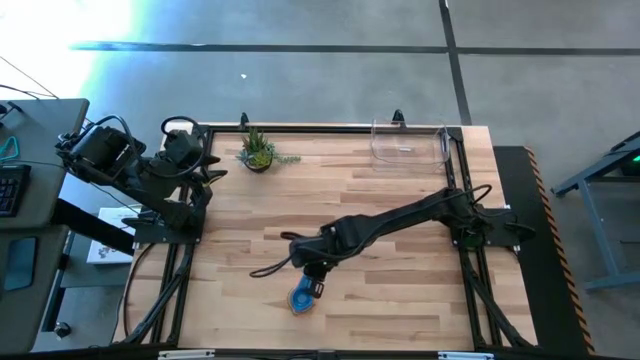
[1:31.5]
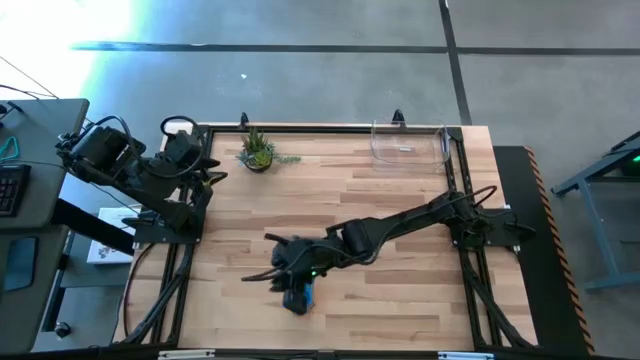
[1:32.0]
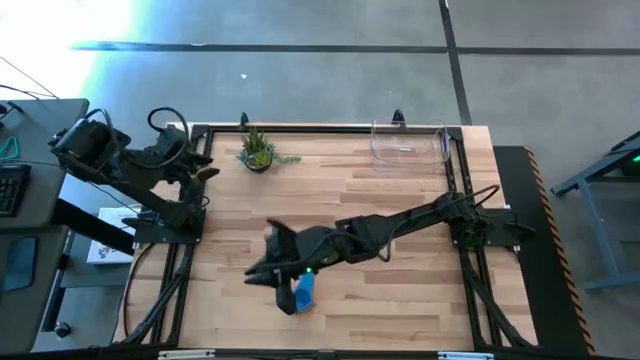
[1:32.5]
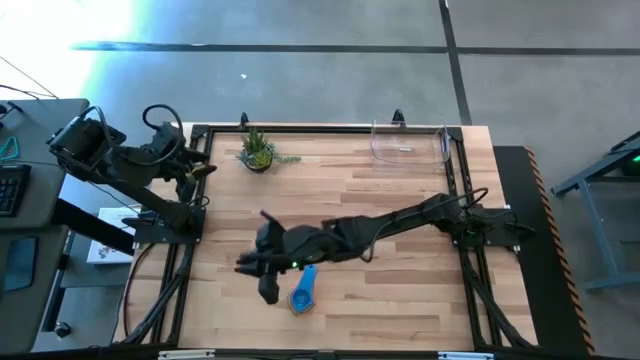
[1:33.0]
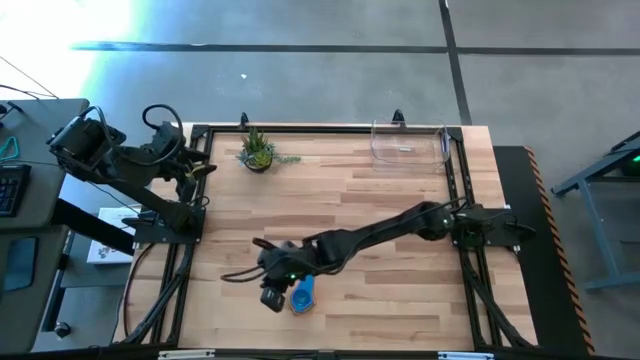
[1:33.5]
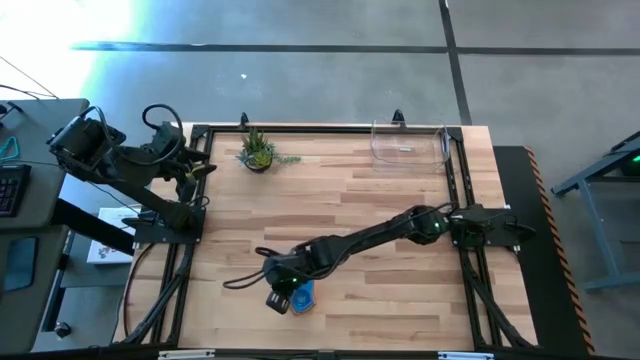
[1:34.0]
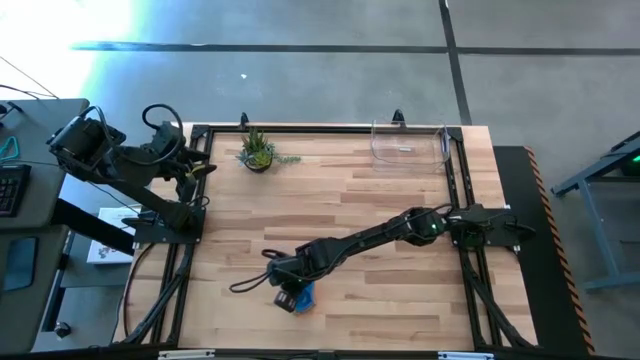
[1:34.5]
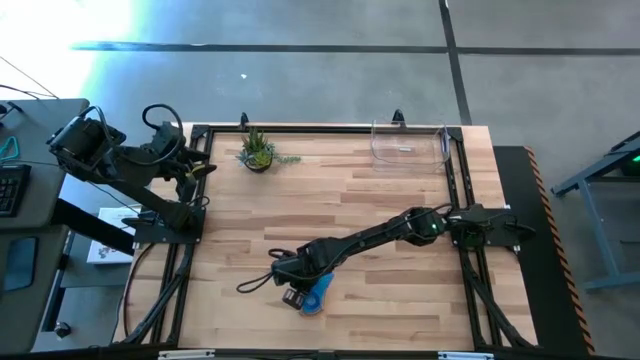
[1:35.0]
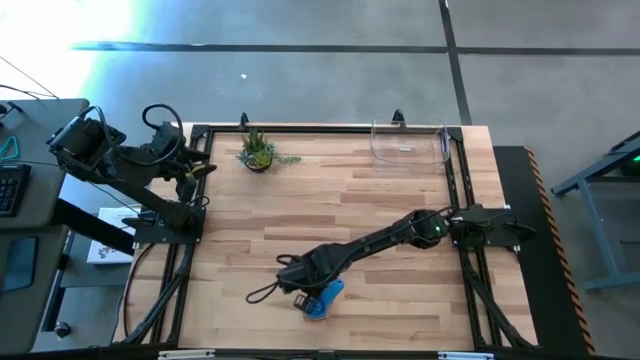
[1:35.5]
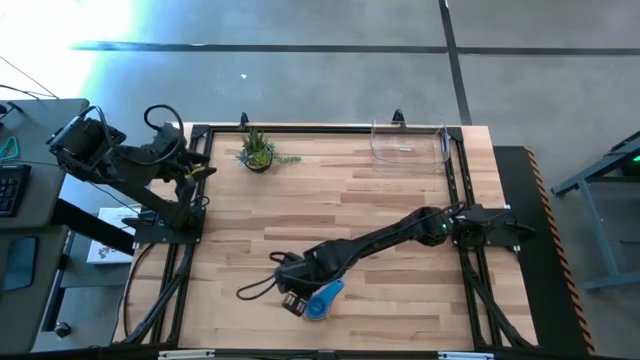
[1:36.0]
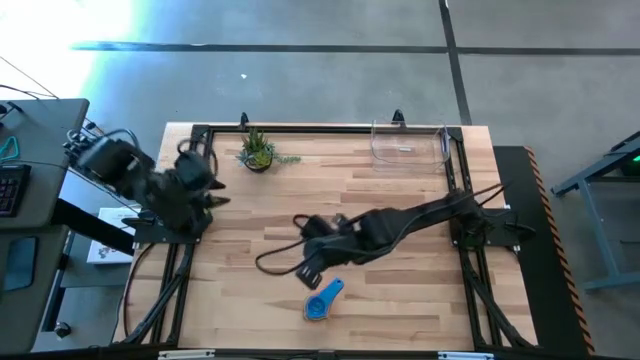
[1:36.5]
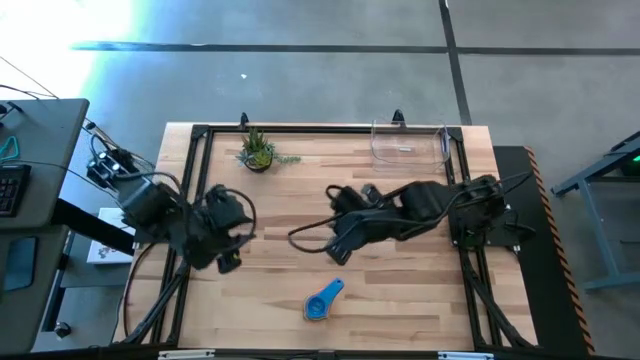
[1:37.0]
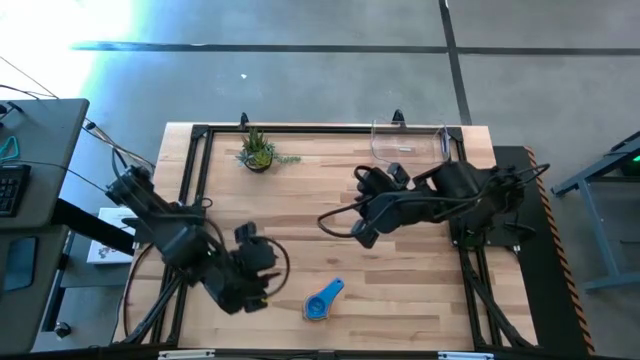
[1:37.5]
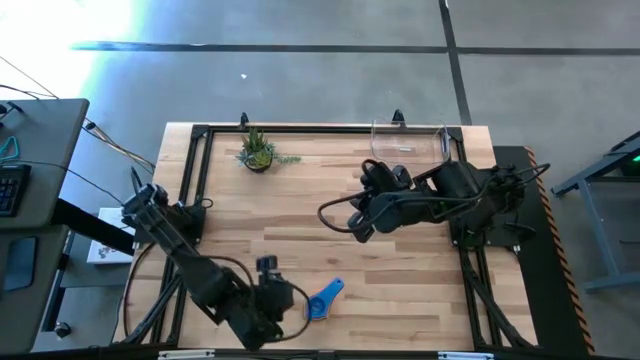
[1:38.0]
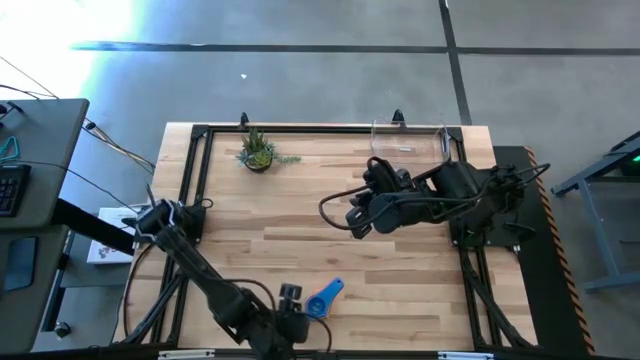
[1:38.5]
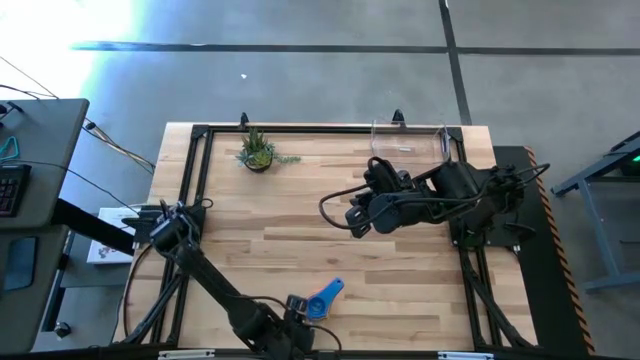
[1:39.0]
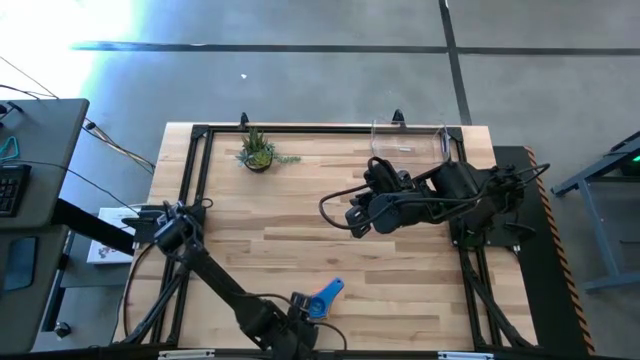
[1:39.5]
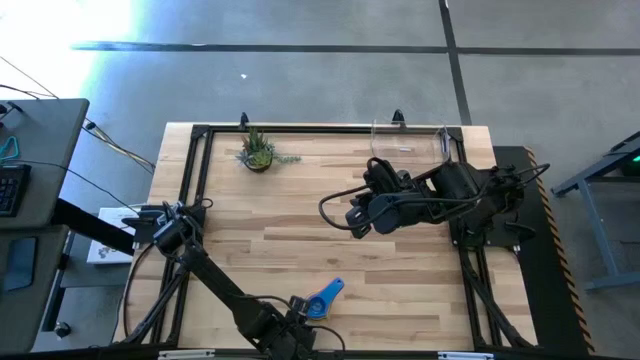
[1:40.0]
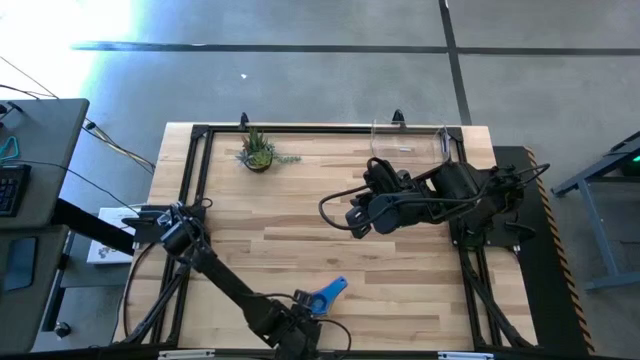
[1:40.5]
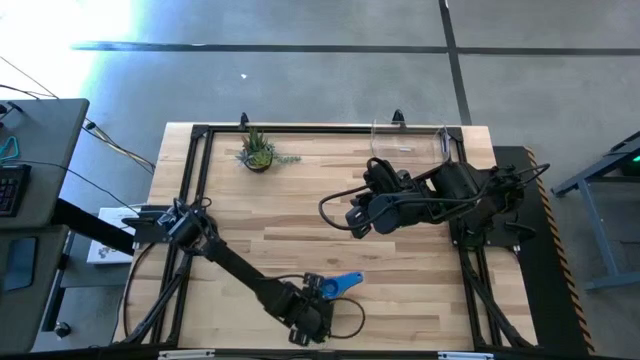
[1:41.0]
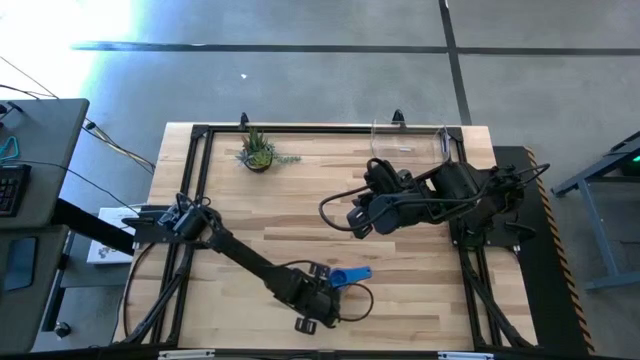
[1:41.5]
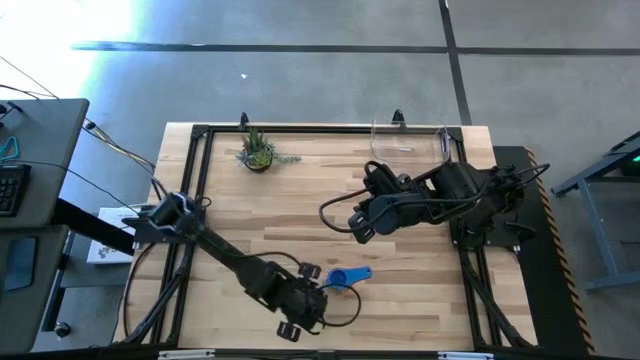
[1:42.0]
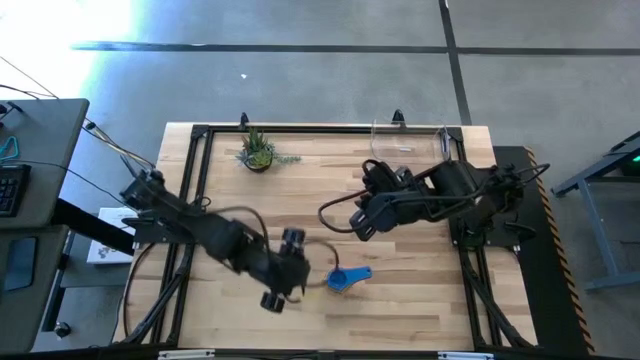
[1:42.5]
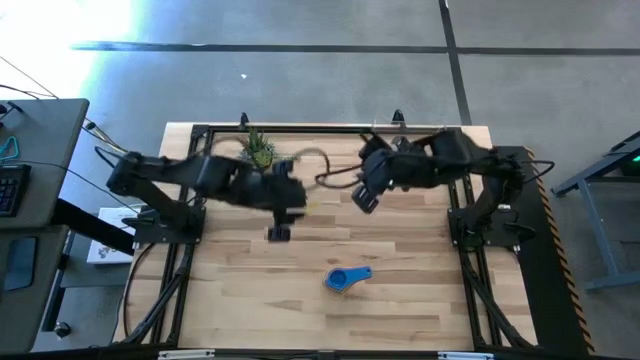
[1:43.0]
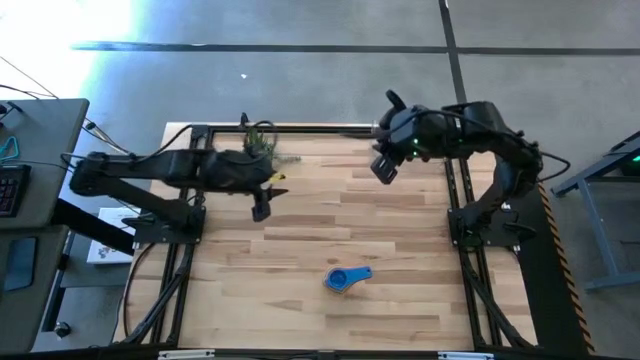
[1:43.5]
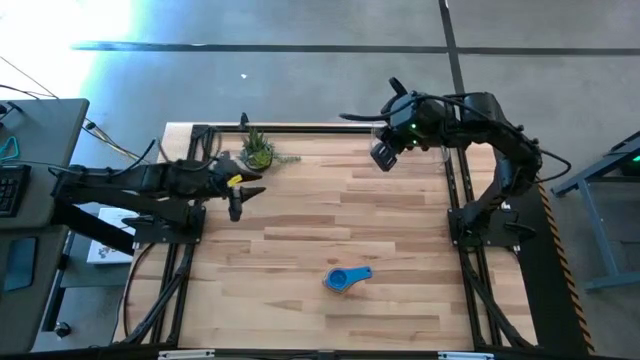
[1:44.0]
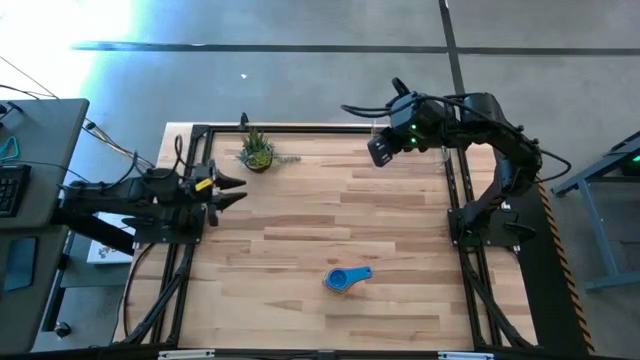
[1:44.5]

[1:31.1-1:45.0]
Task: Nest measuring cups in basket
Put the stacked measuring cups into the transparent bin

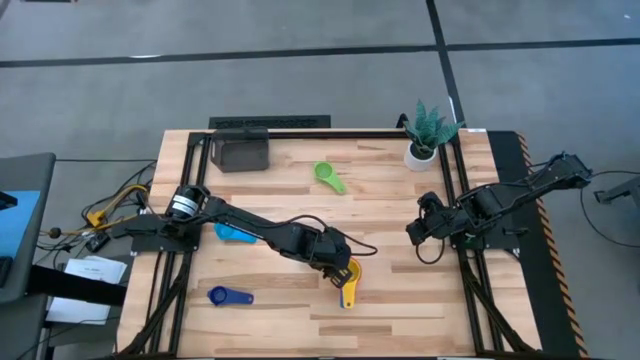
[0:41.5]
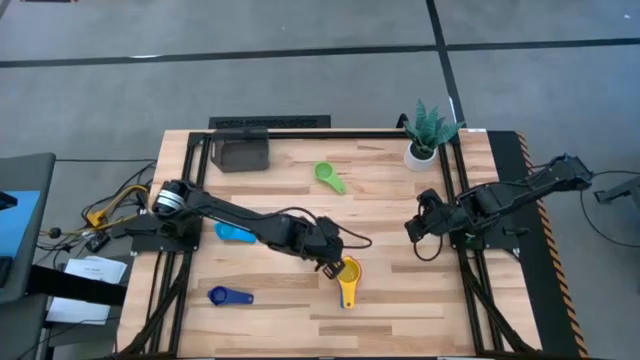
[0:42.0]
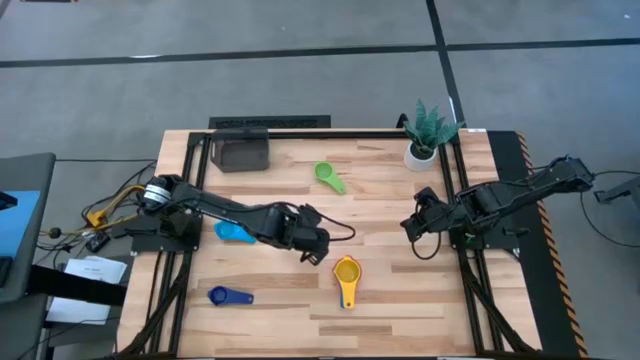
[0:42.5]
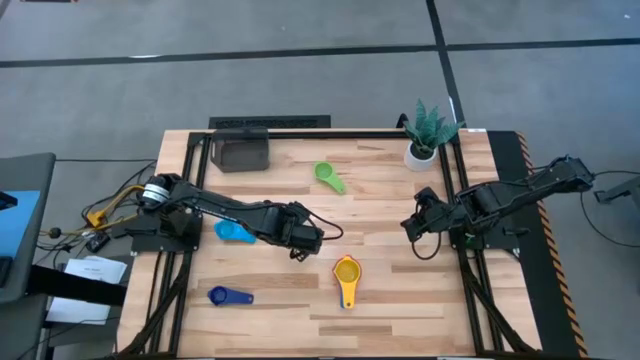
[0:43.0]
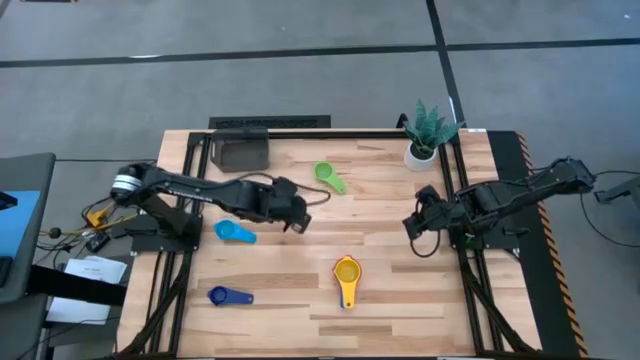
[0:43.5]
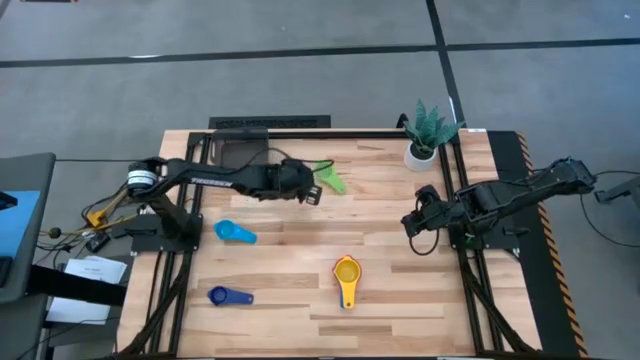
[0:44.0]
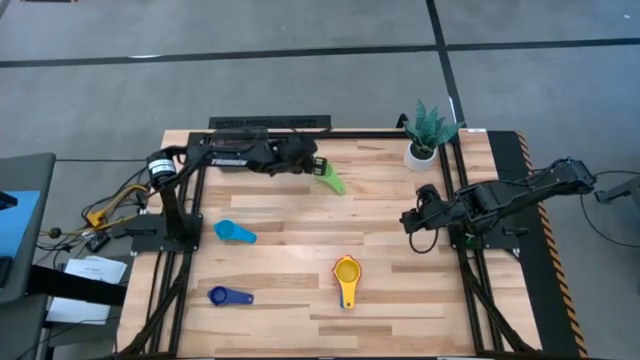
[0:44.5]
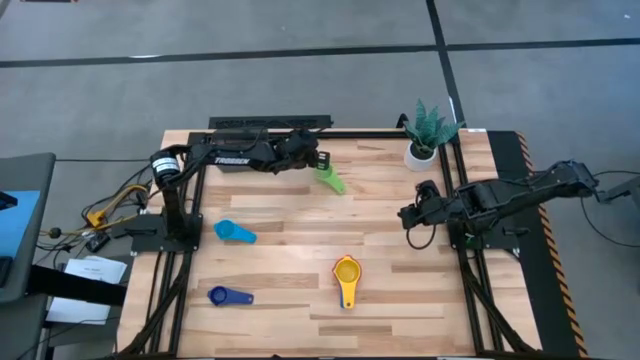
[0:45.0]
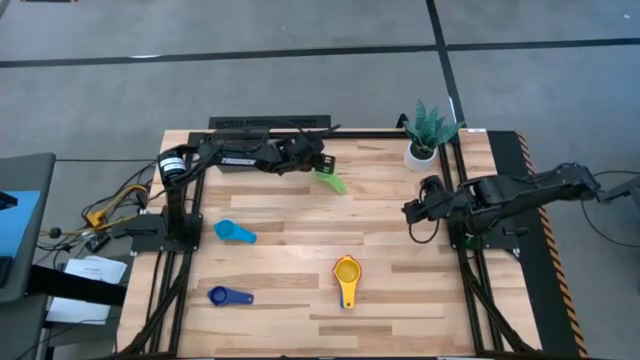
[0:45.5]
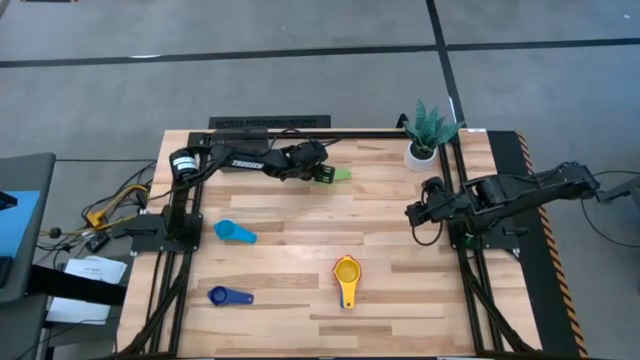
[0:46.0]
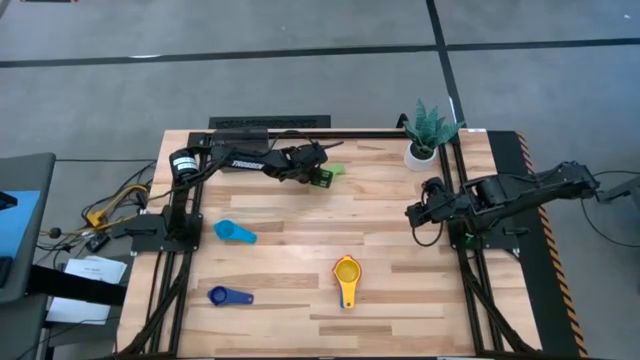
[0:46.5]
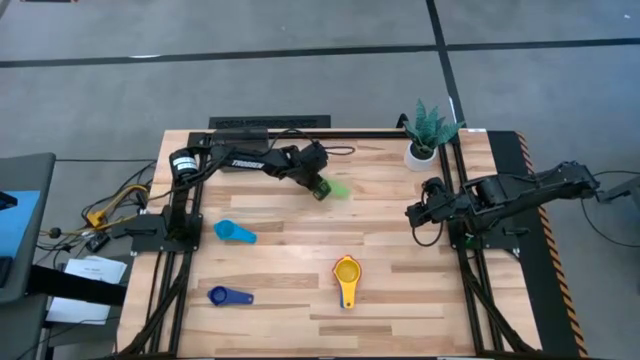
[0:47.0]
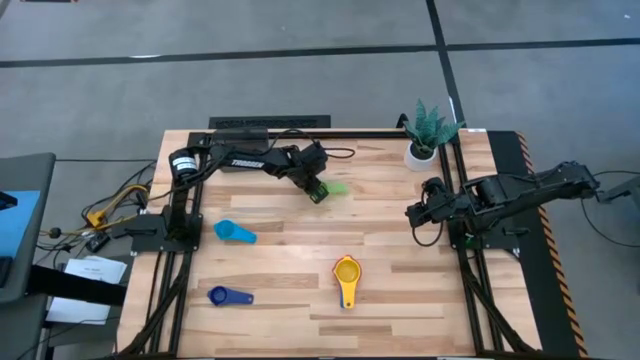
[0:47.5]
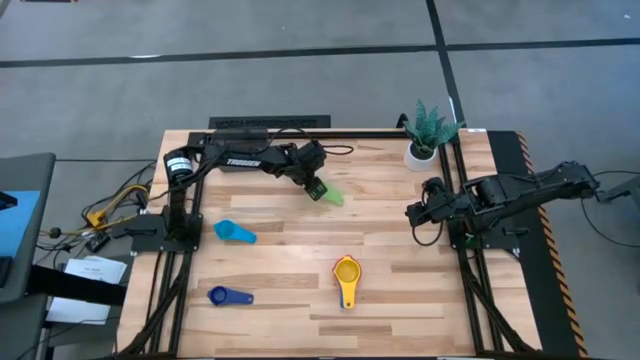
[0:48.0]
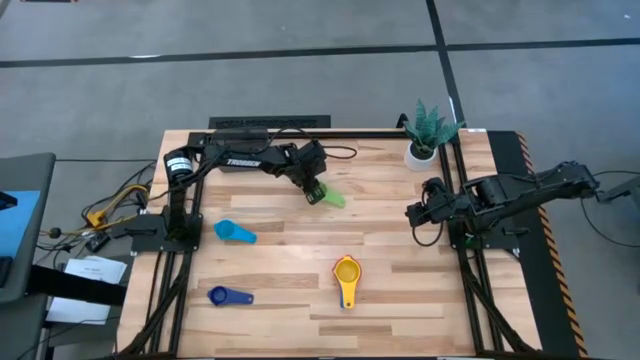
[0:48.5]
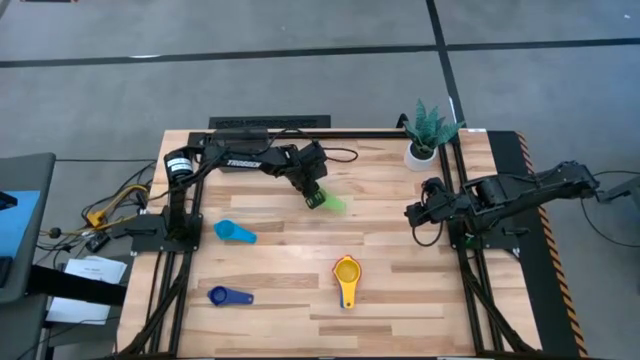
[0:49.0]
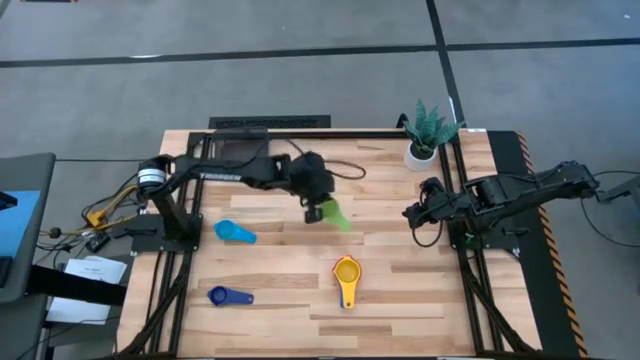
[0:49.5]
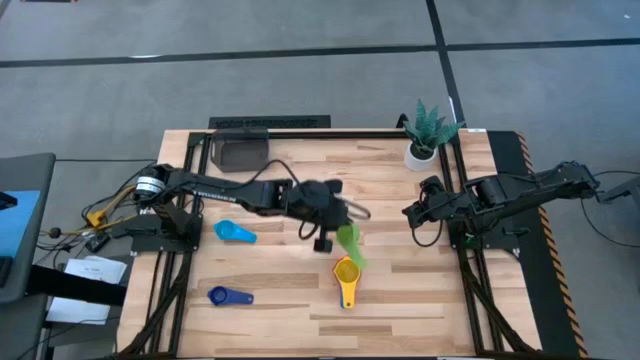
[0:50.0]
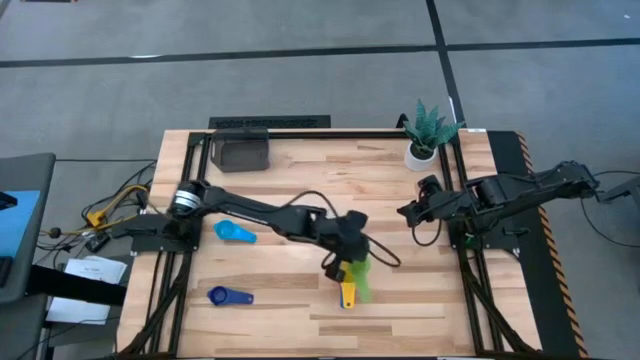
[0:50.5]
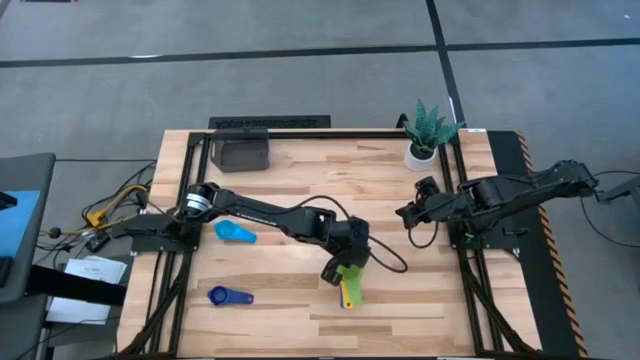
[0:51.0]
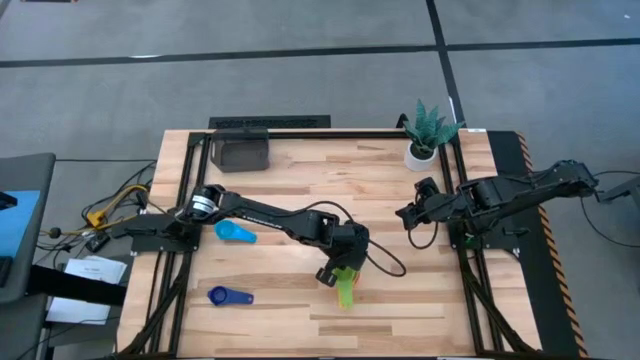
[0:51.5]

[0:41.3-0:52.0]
Task: Nest measuring cups in basket
Stack the green measuring cup on top of the yellow measuring cup
